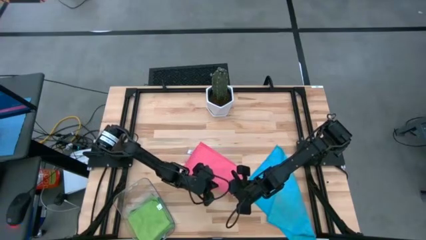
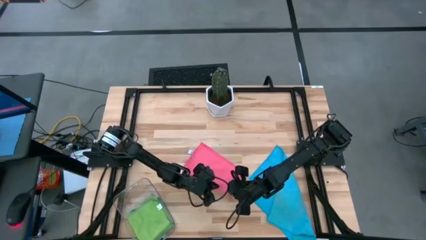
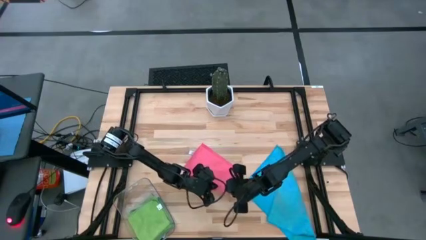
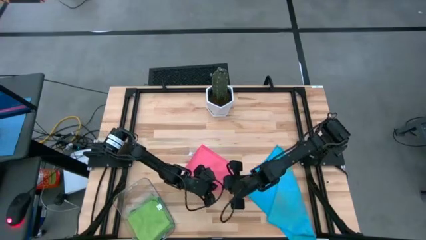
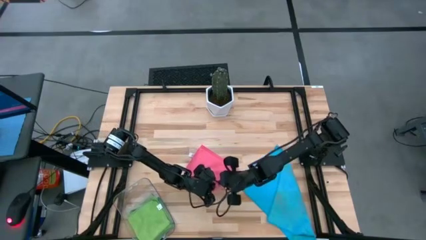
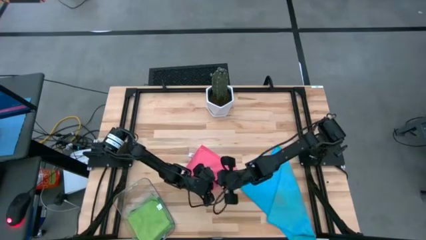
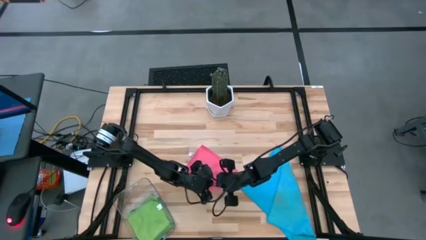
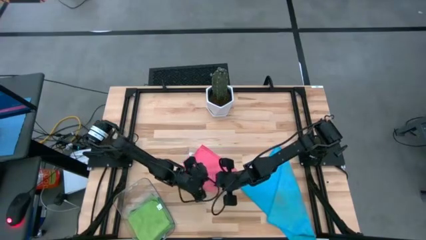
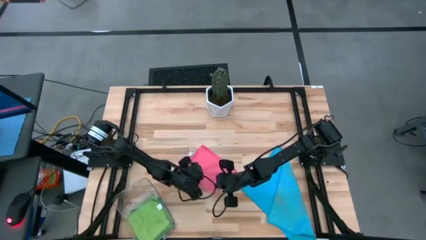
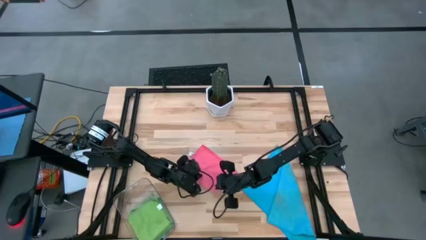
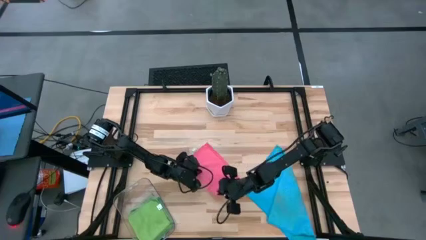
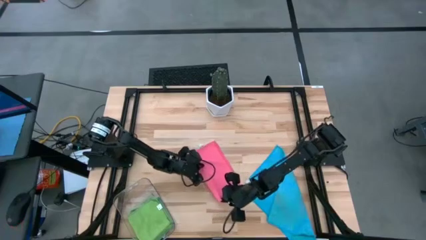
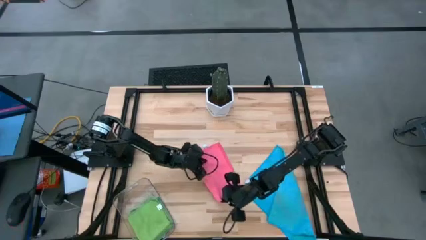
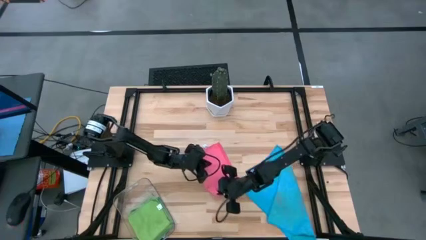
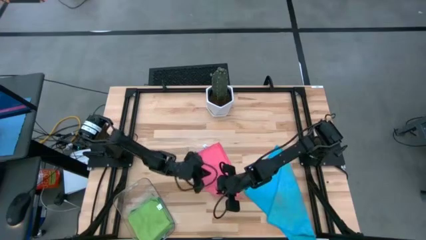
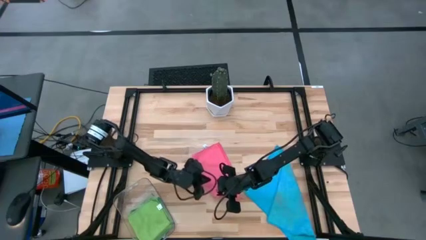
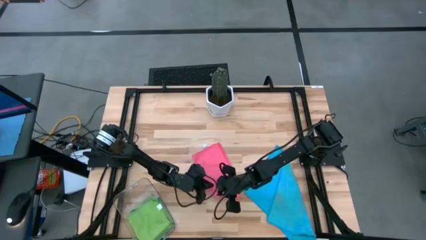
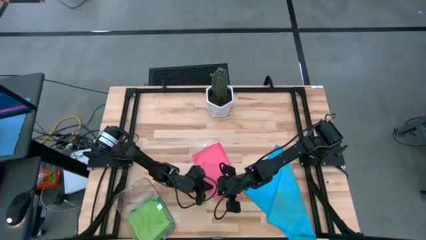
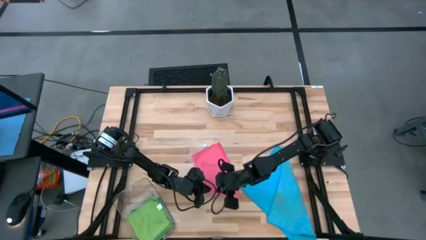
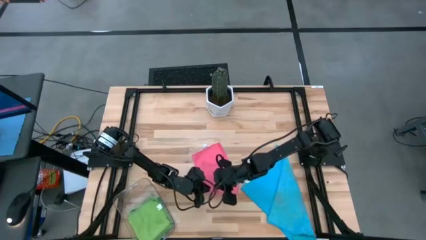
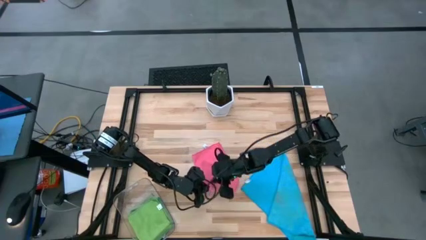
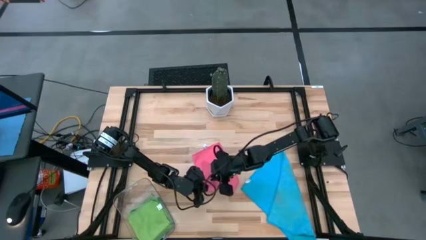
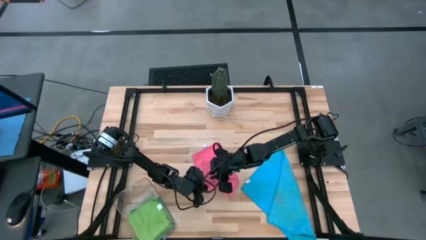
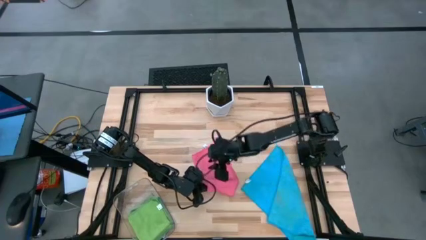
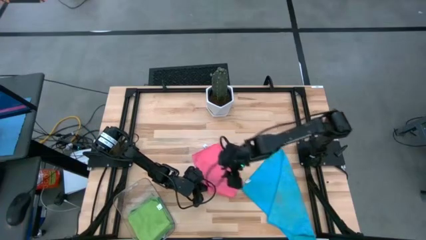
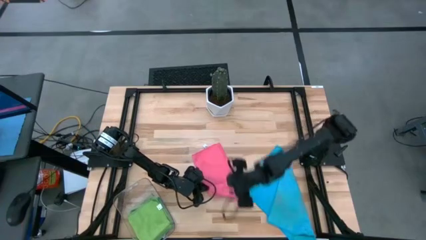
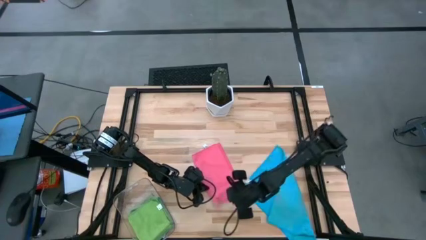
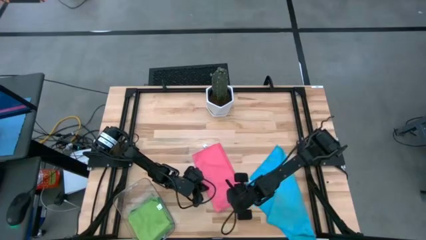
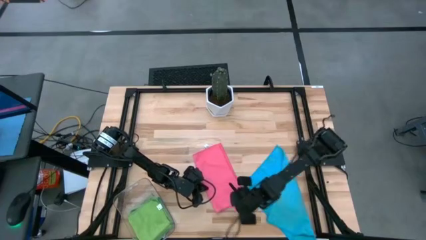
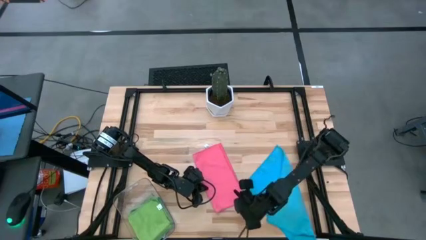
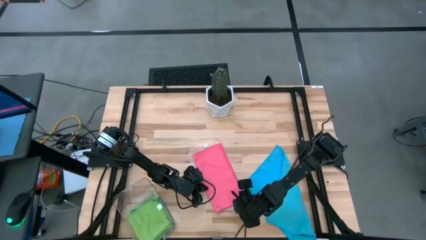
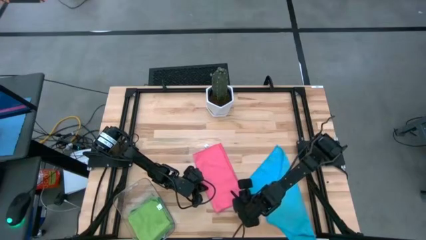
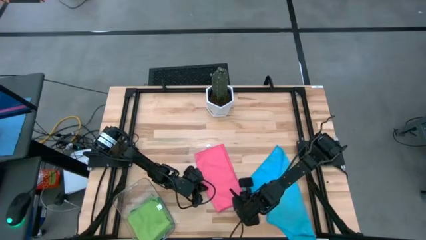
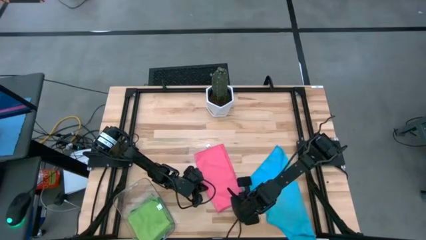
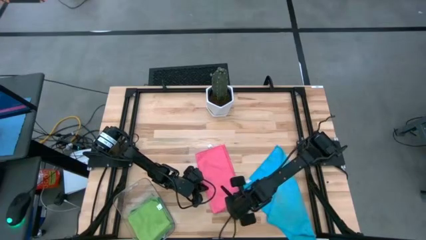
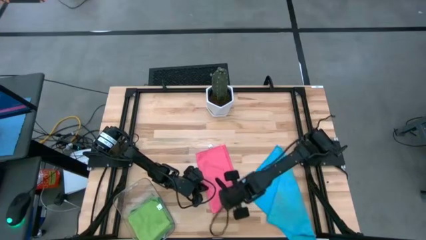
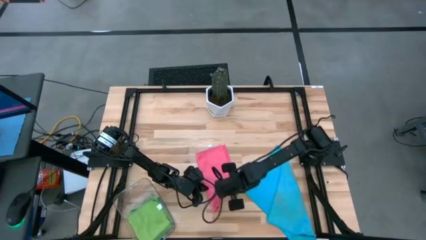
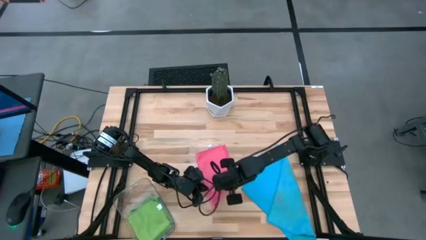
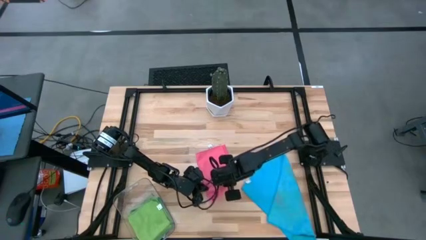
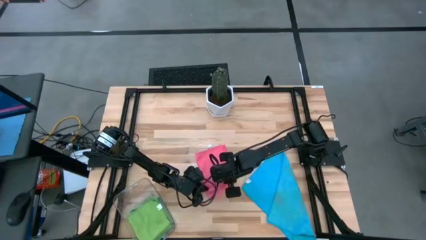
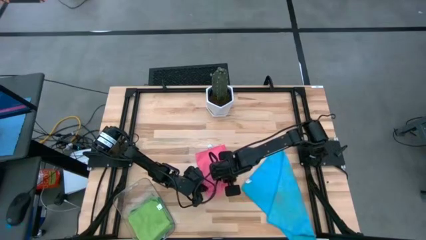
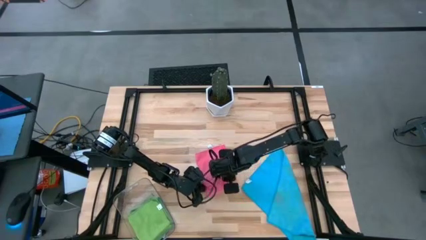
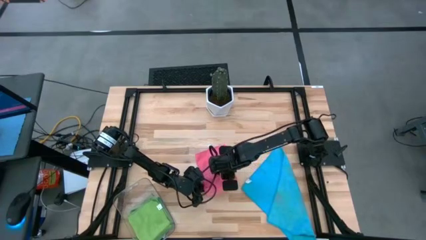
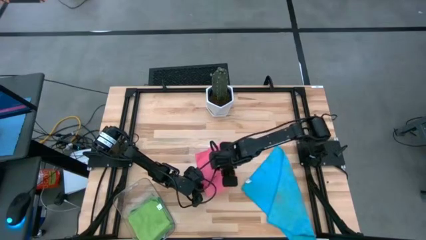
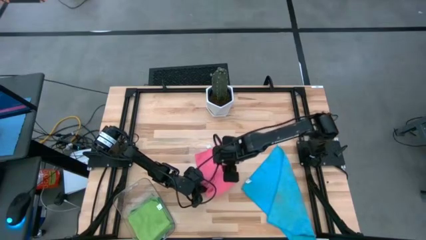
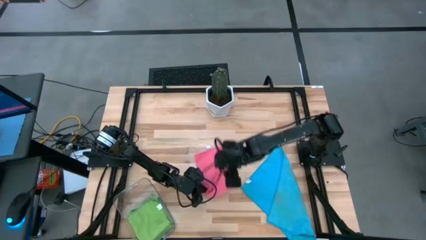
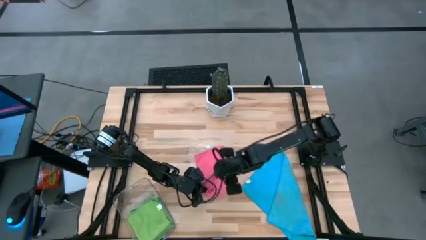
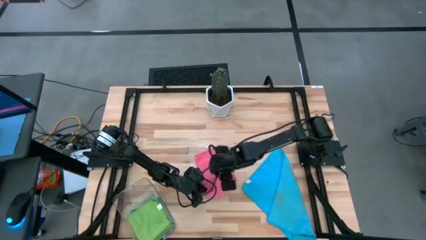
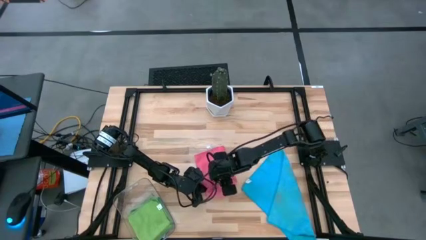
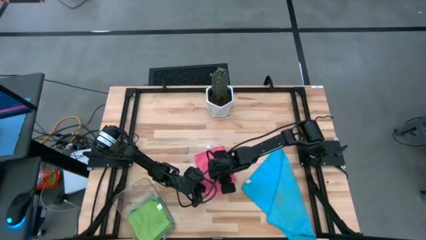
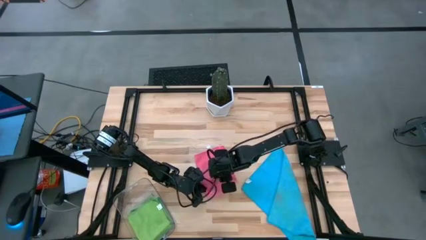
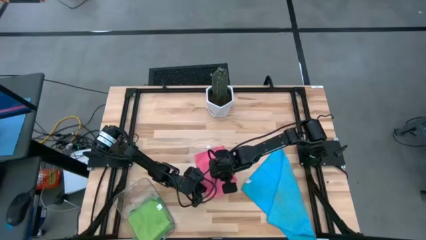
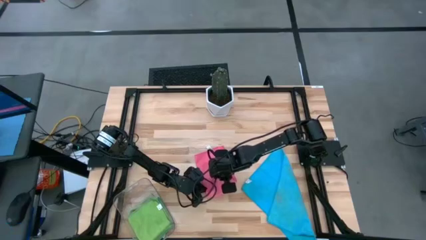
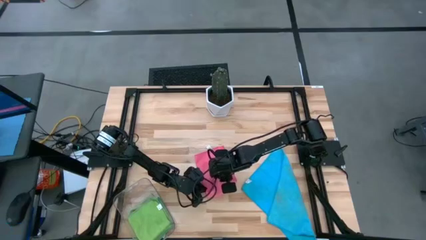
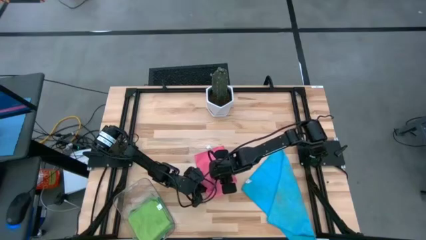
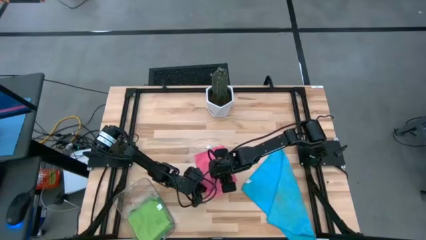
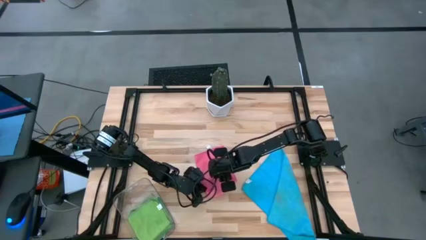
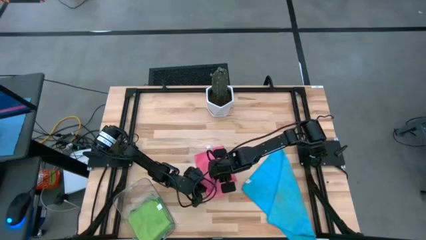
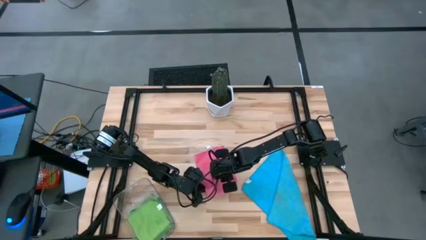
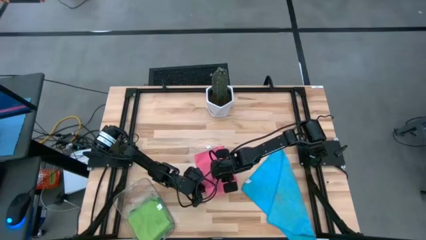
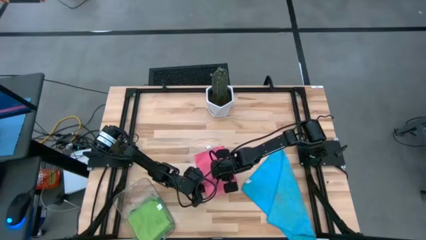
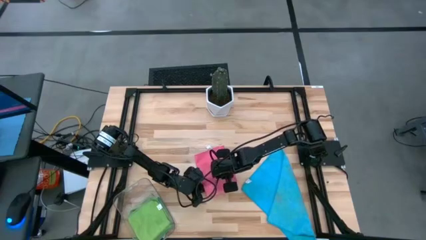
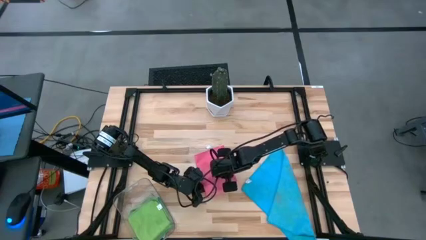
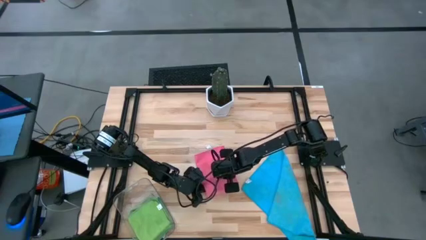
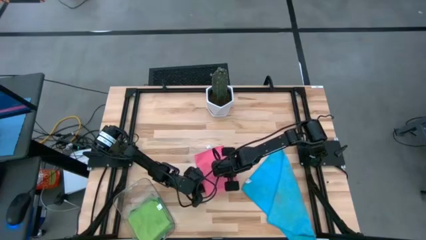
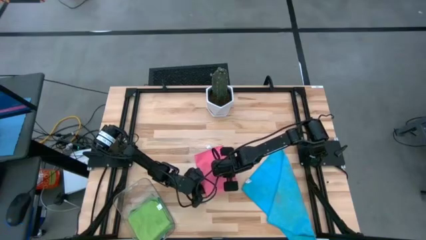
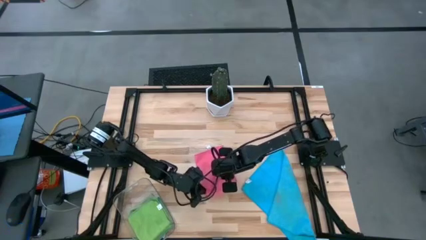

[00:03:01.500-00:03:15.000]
Task: Fold microfiber towels
Fold the pink microfiber cloth

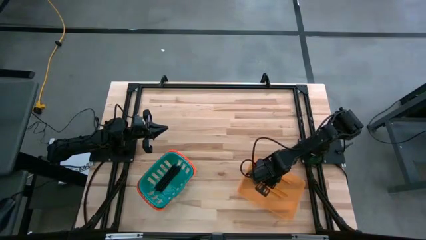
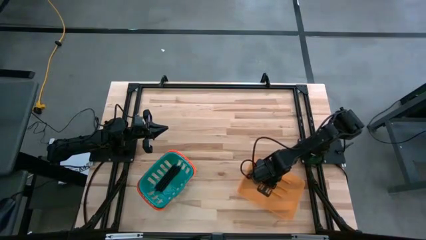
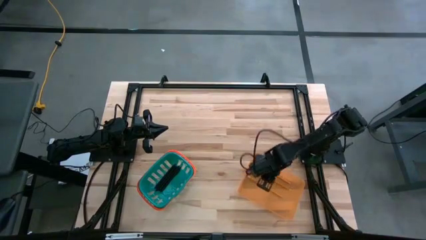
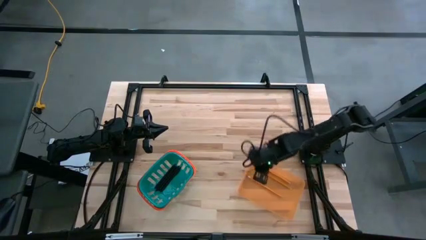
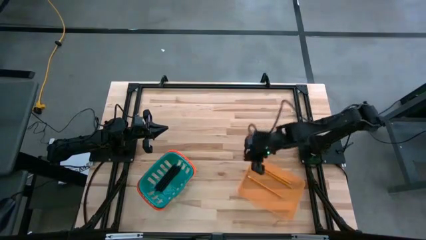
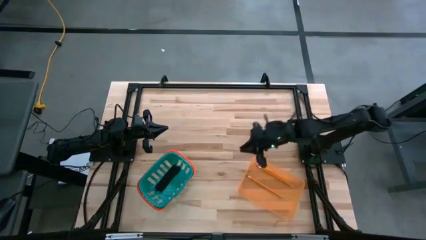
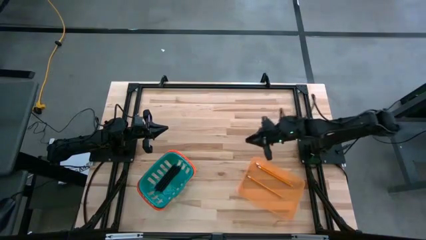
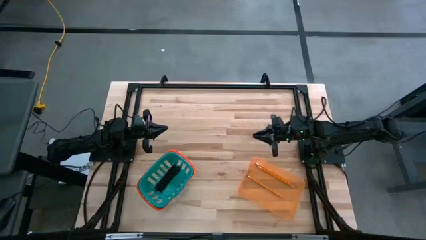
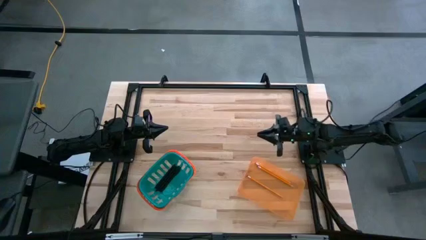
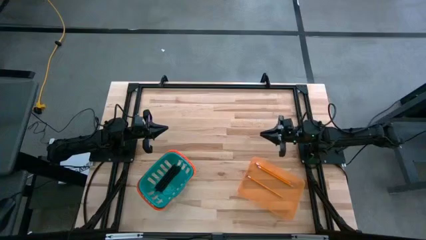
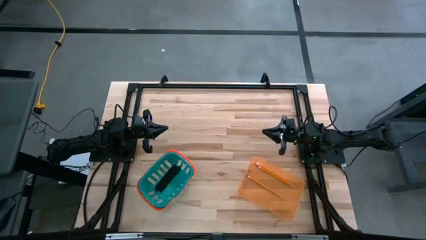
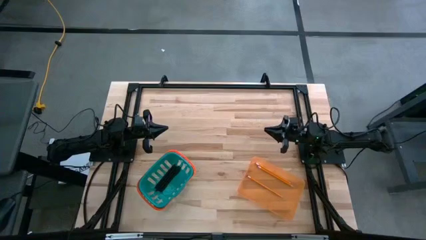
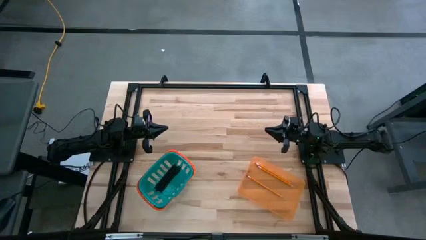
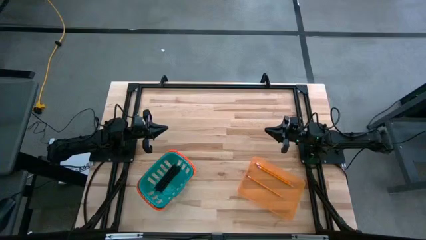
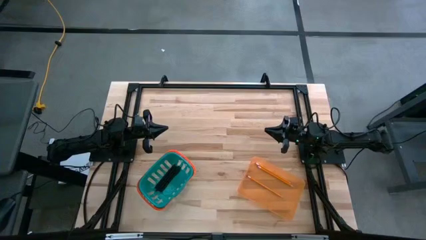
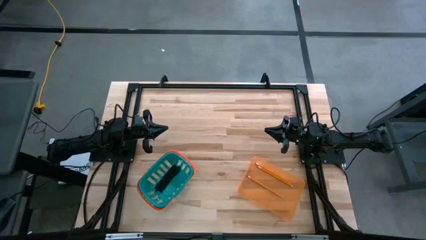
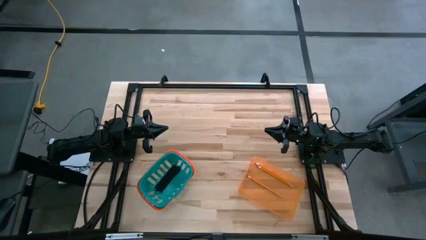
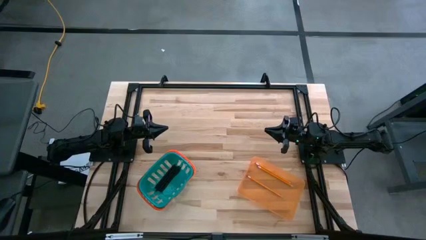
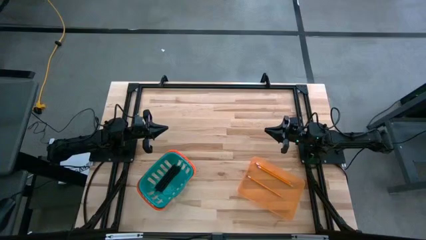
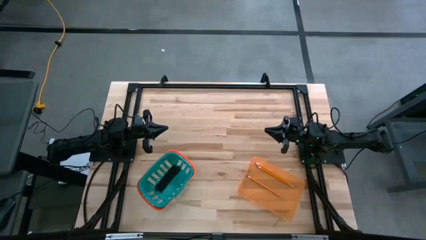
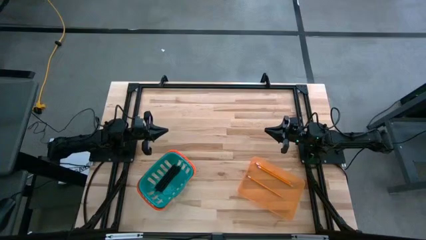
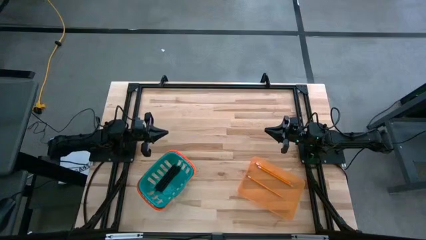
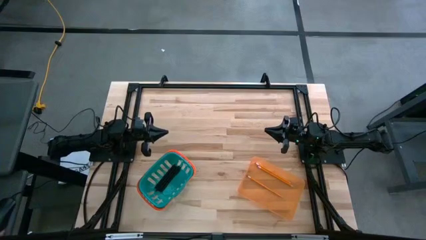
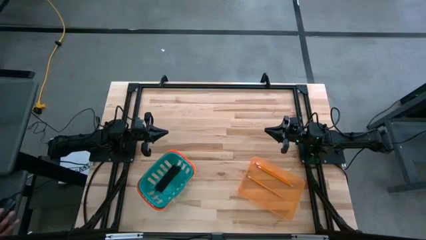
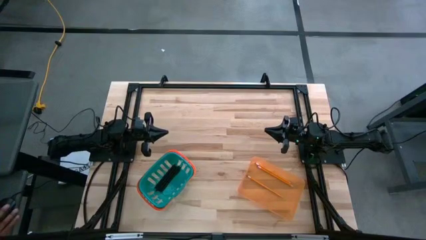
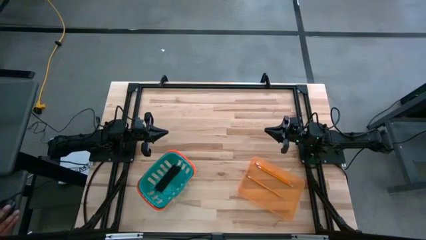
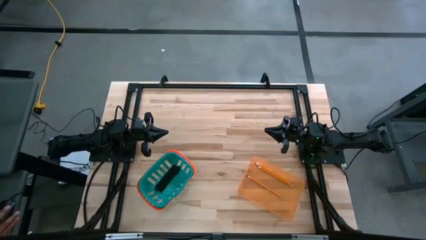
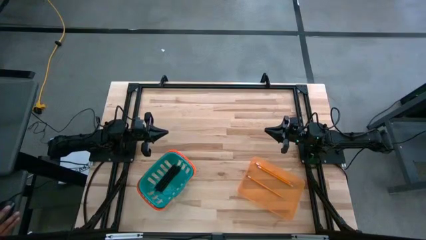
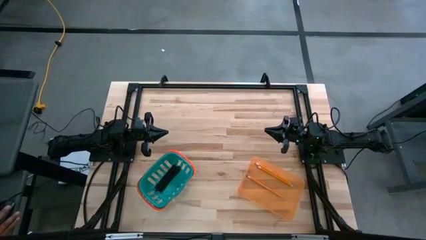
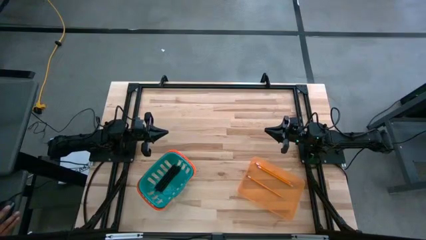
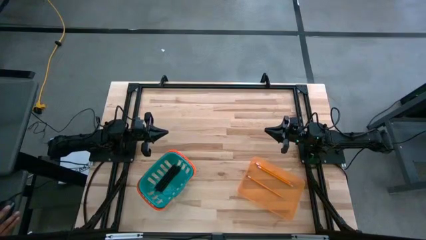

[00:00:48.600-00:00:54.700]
Task: Sort pens & pencils
Return to Home Position
